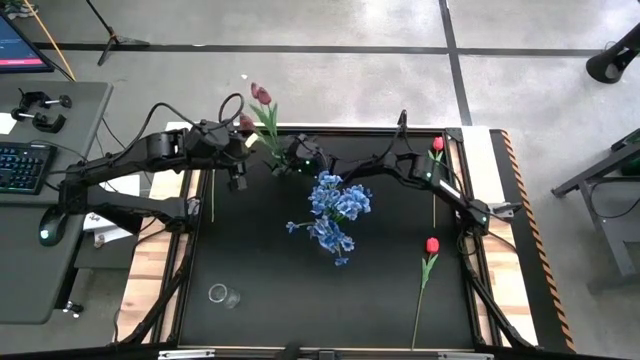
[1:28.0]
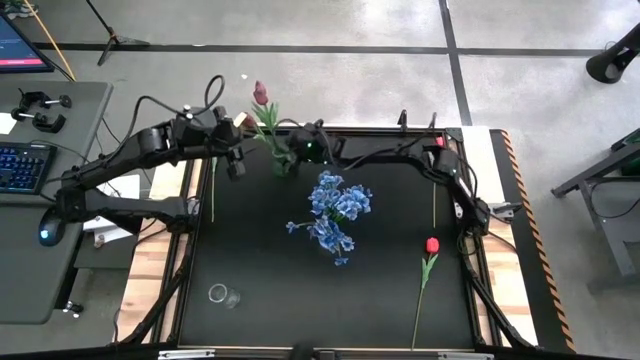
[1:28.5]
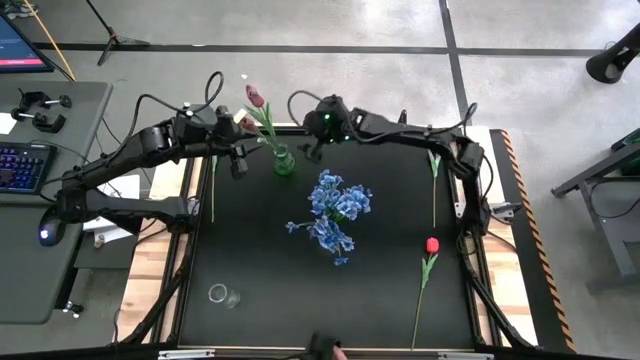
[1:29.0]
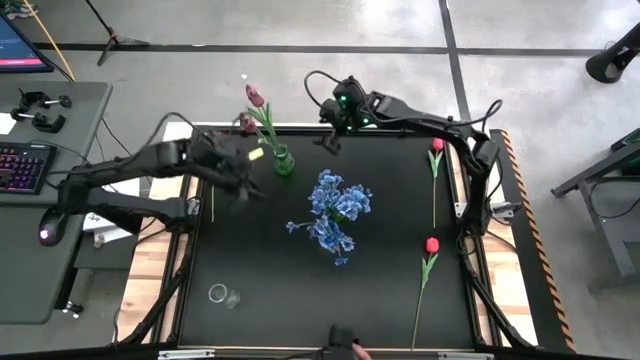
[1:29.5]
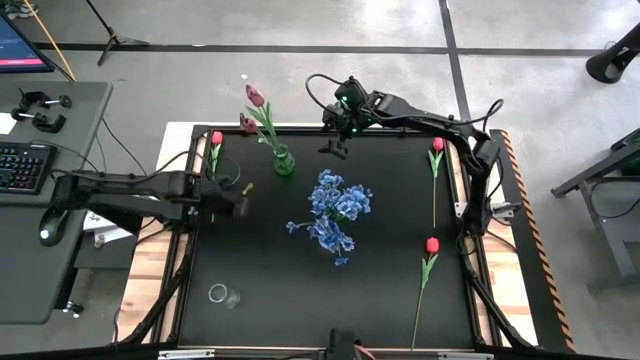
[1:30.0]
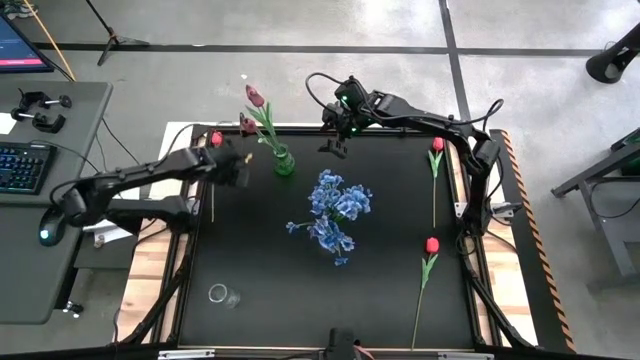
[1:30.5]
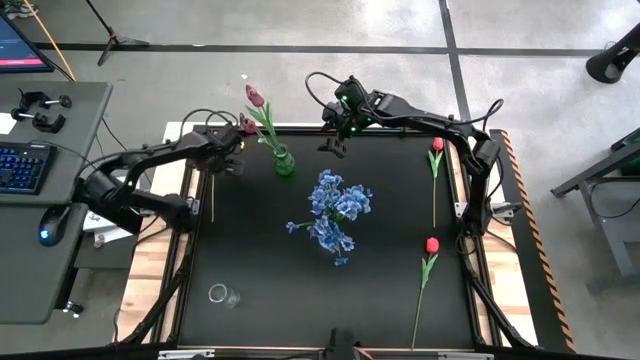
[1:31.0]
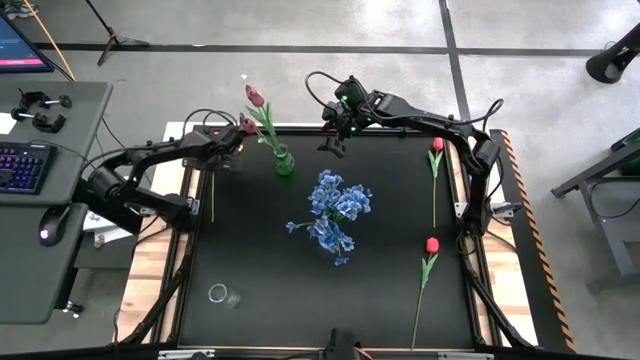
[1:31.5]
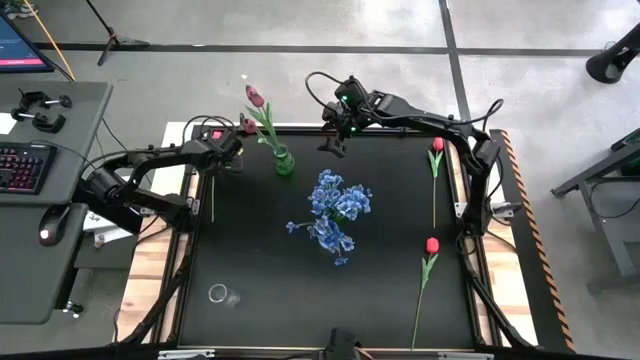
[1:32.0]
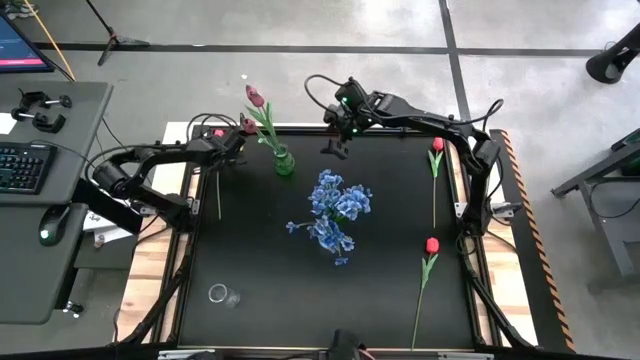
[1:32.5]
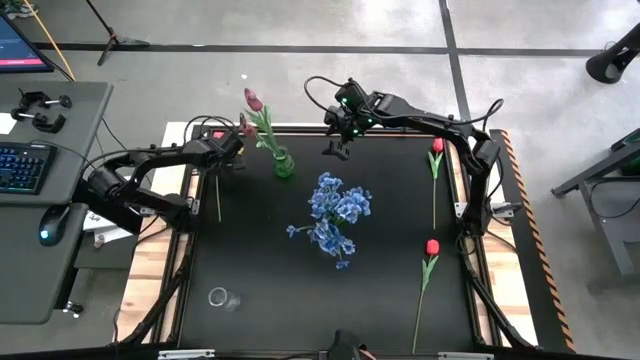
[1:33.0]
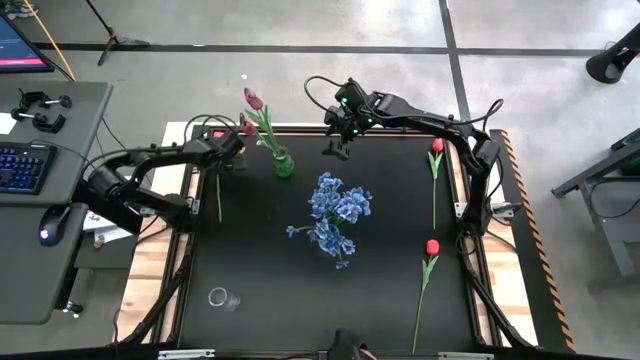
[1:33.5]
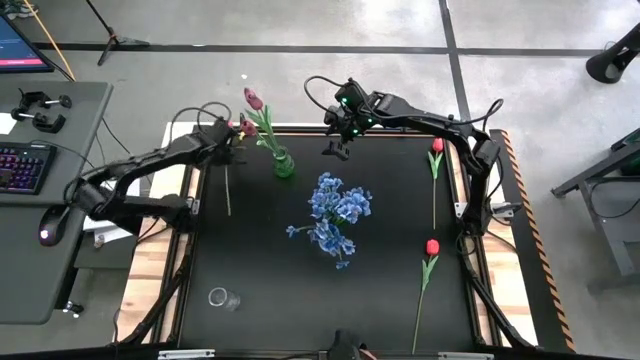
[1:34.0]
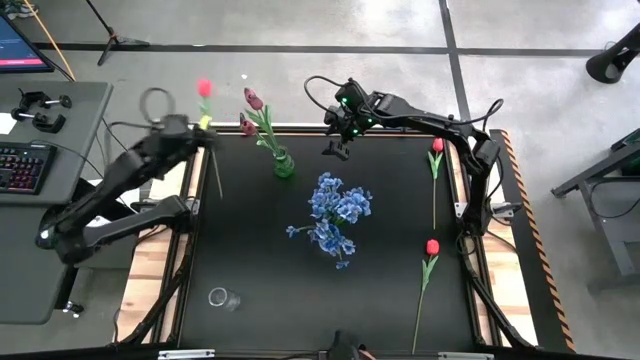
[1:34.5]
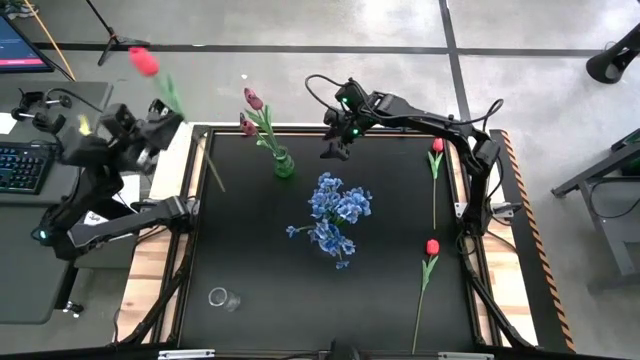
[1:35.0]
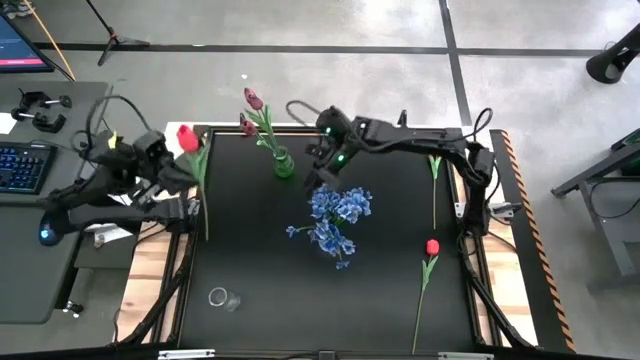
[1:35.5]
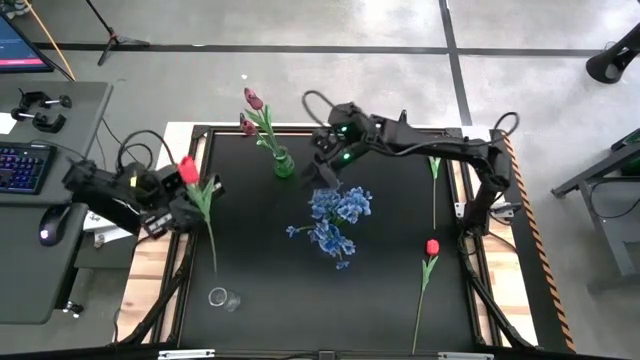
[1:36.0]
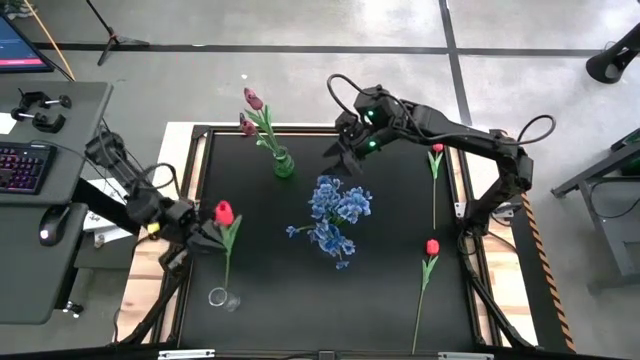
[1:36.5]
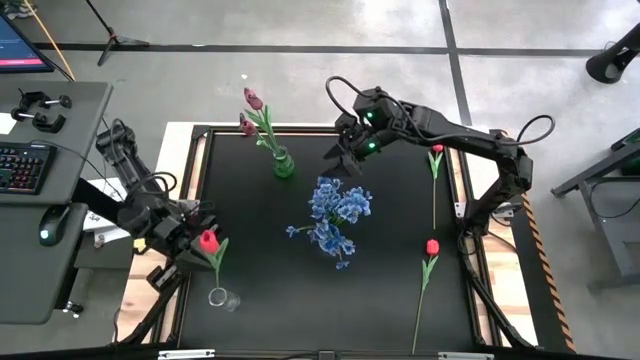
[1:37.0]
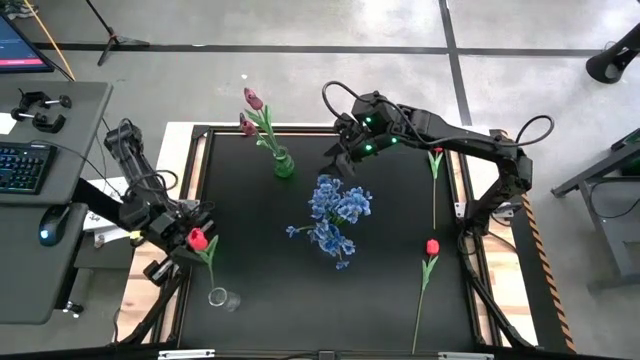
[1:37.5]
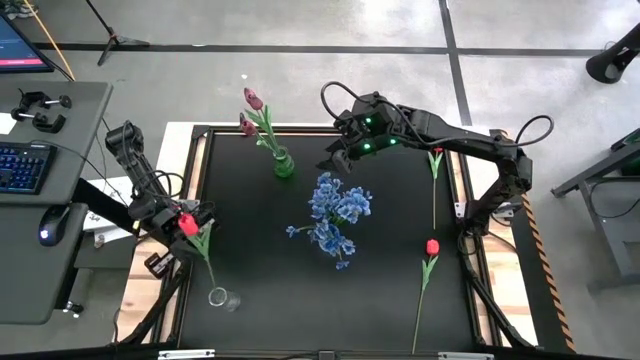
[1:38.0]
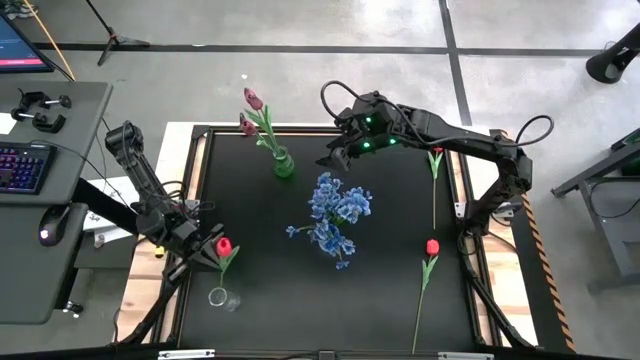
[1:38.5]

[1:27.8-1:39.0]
Task: Sort flowers into vase by color
Put the top left red tulip into the left transparent vase

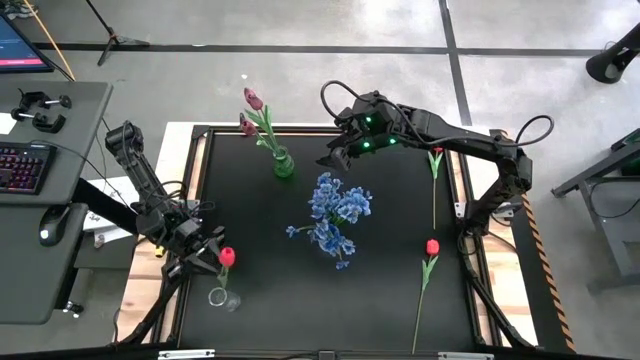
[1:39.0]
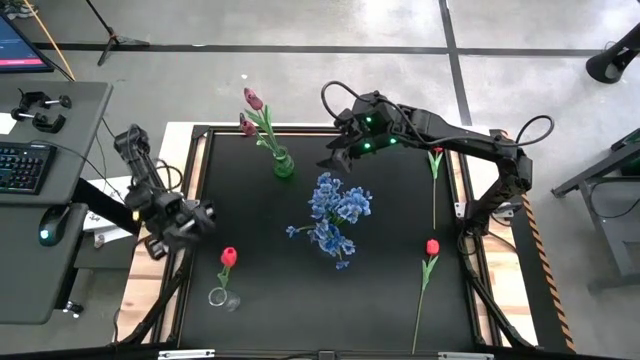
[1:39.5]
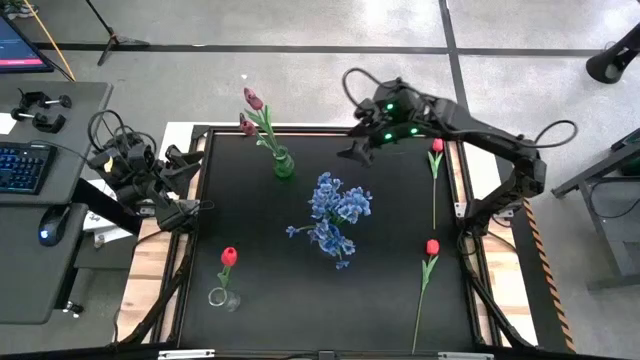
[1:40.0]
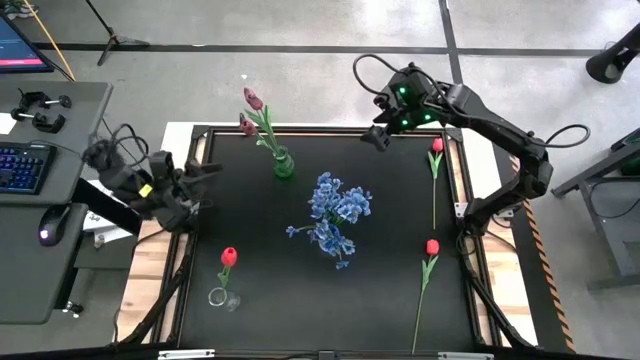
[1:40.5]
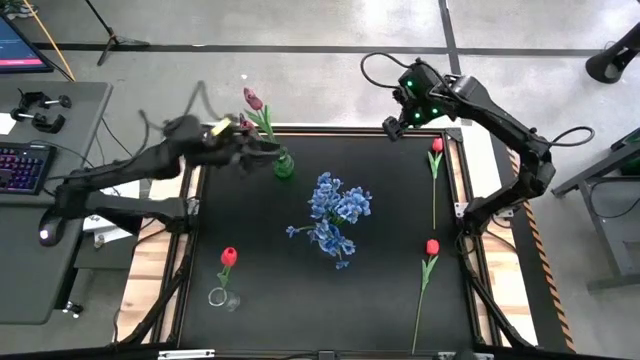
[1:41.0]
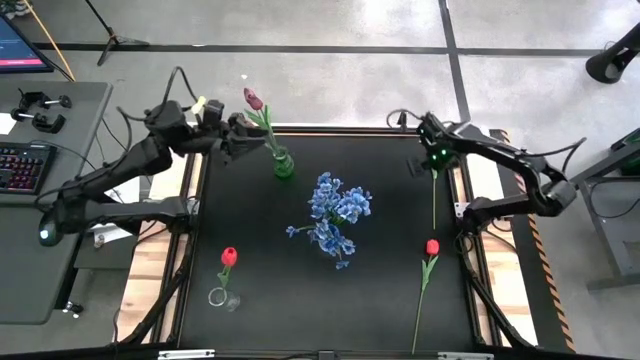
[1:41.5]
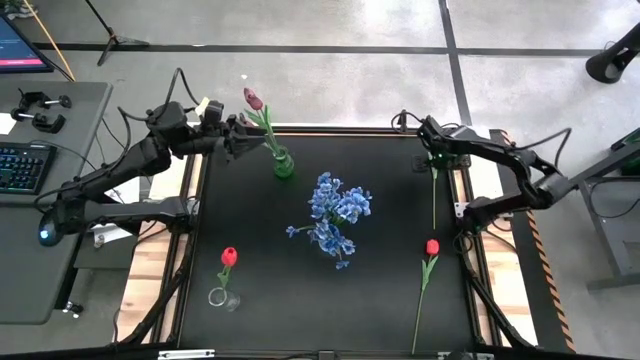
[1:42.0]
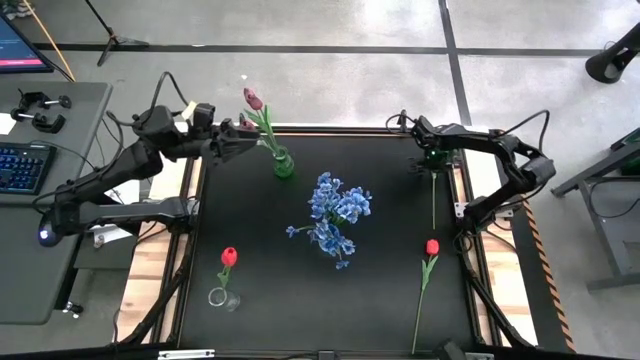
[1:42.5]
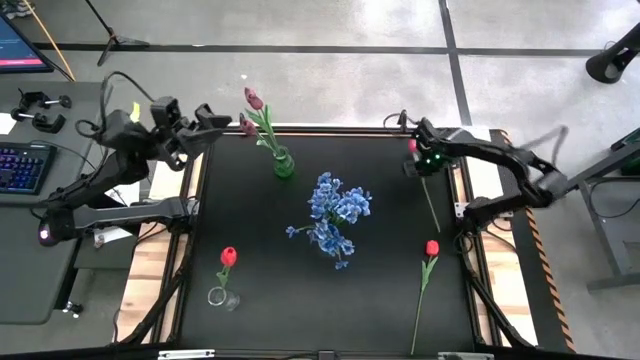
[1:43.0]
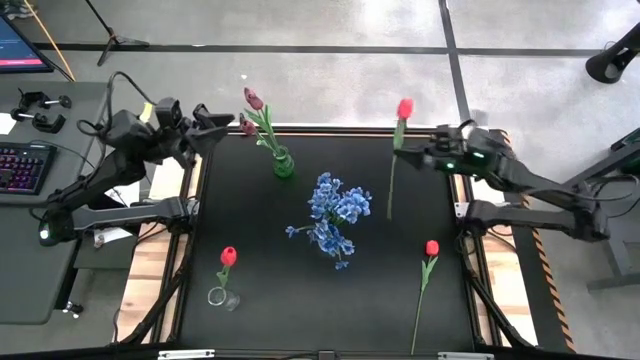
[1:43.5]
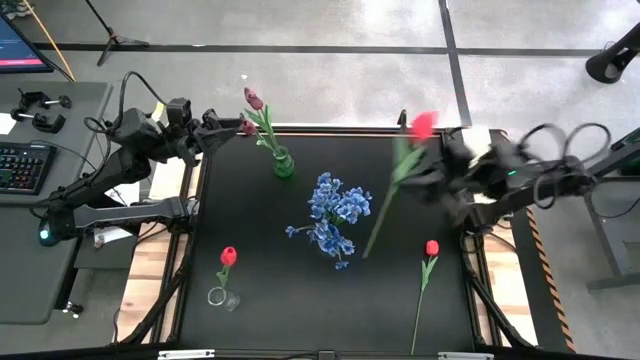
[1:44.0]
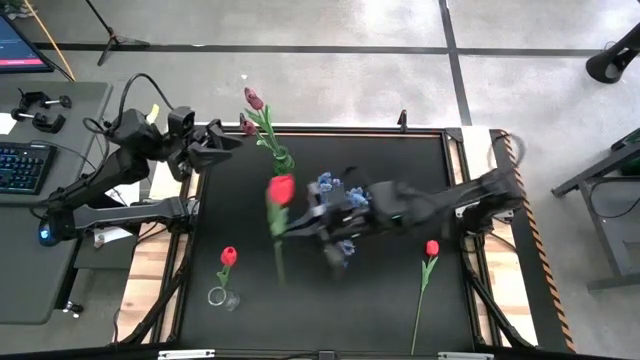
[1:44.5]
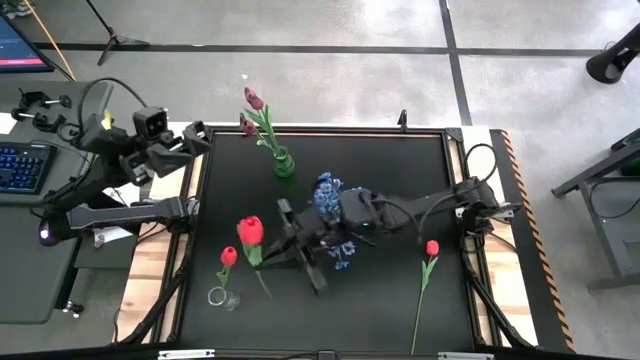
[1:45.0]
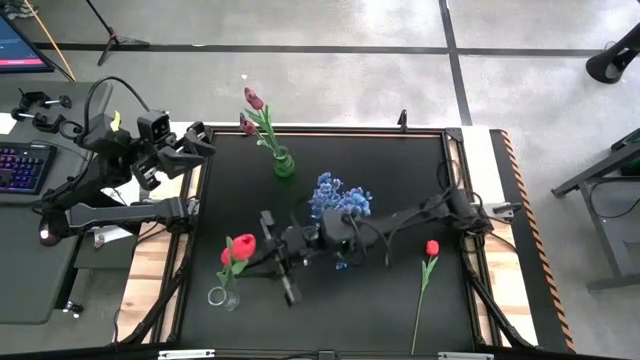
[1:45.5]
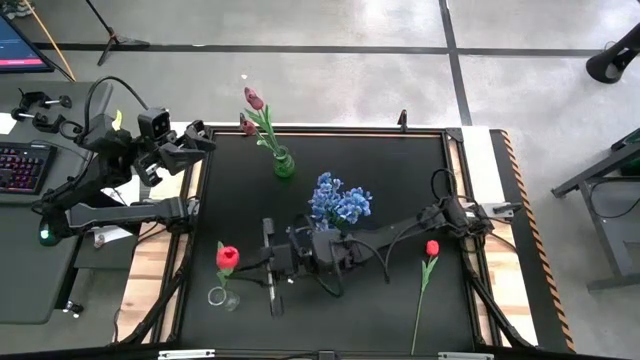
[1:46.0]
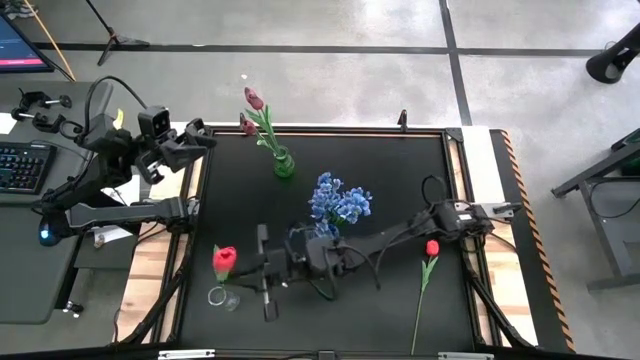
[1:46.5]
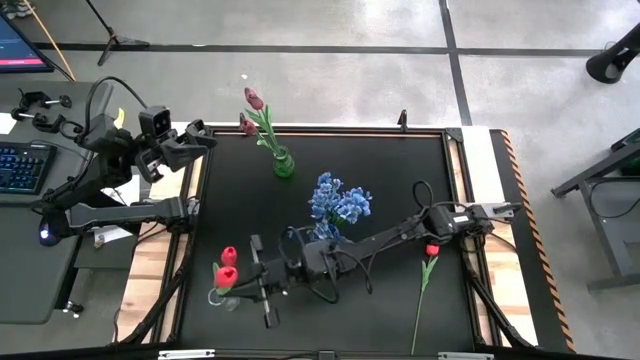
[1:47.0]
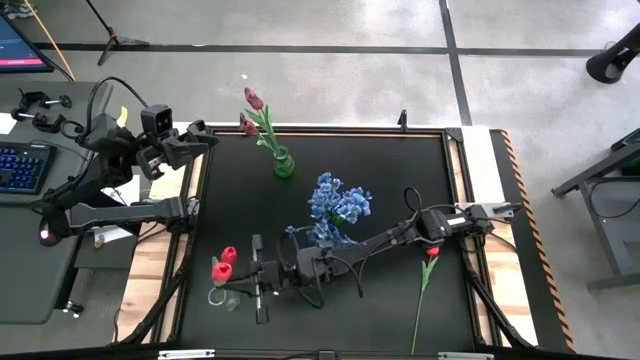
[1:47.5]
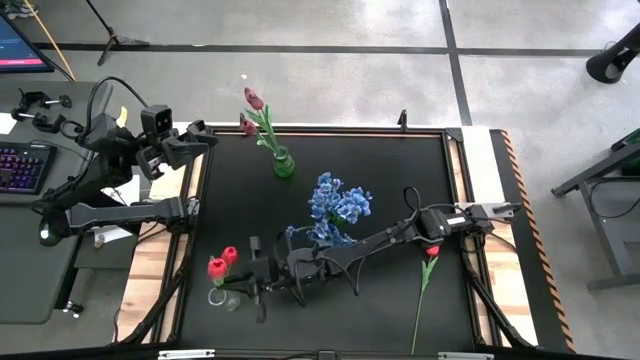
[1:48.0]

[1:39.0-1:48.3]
Put the top red tulip into the left transparent vase

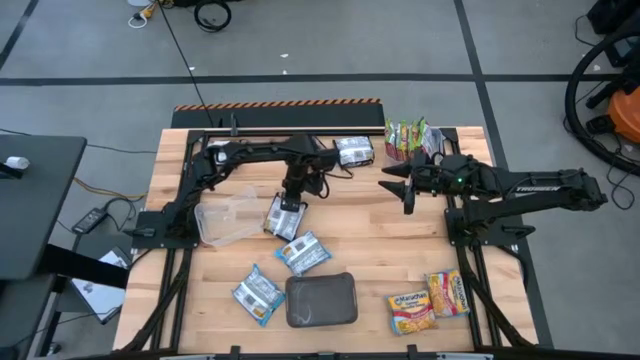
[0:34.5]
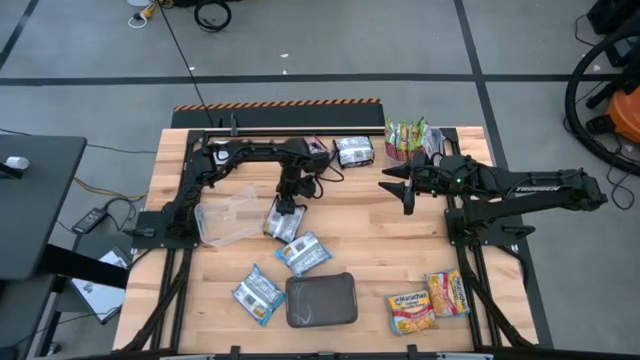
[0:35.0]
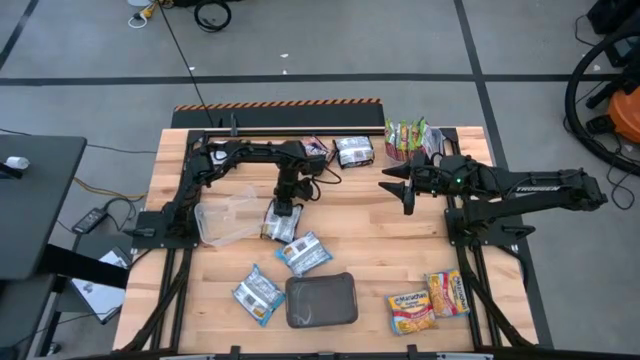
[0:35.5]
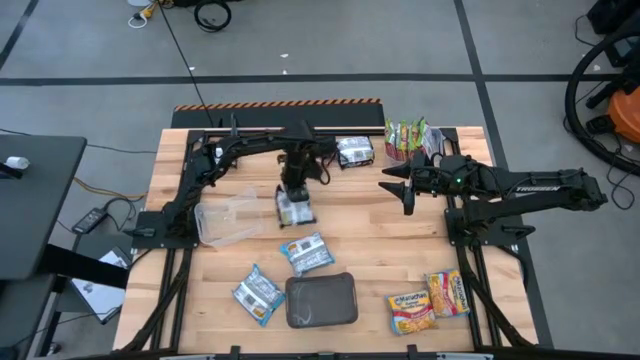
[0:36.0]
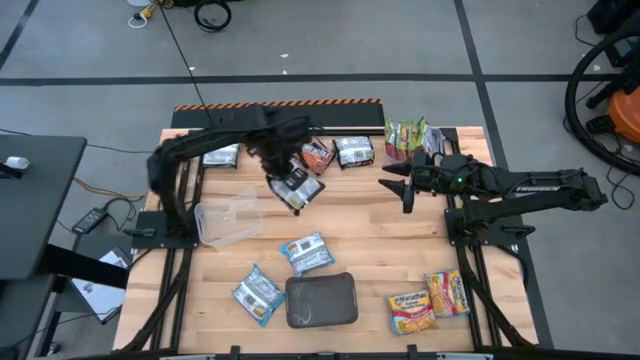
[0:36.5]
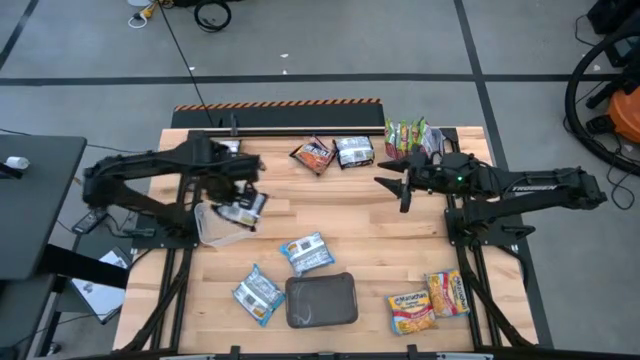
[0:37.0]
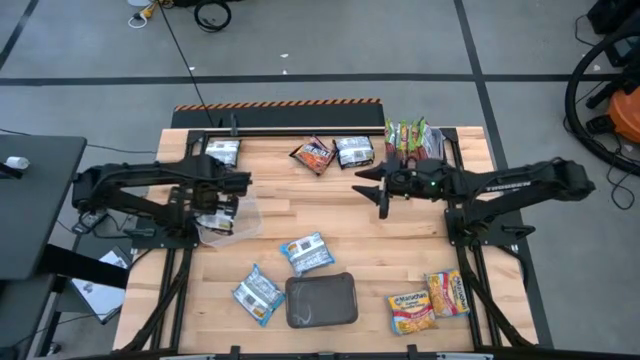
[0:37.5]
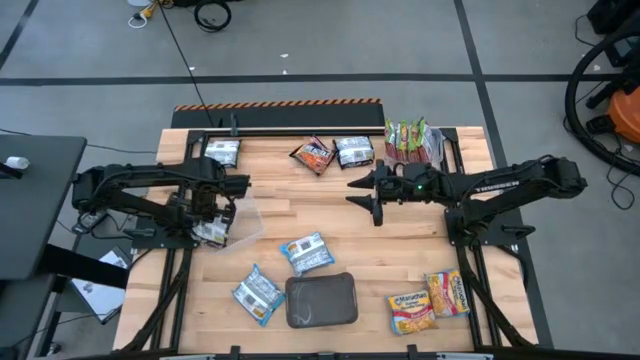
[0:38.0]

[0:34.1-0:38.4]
Task: Sort Maruchan noodles
Put the black noodle pack into the bottom transparent bin
